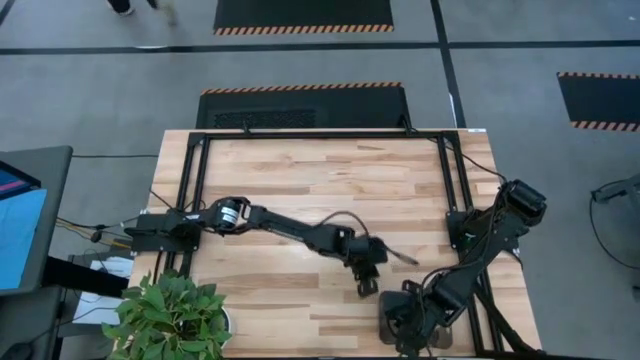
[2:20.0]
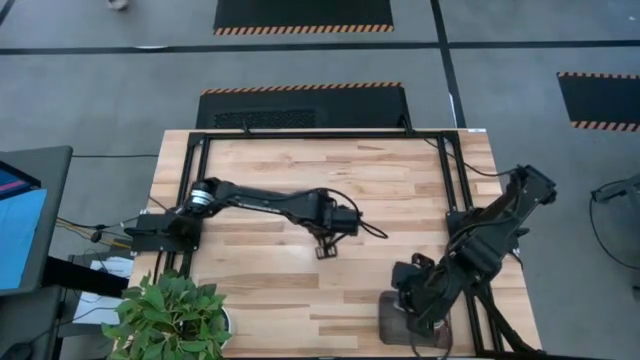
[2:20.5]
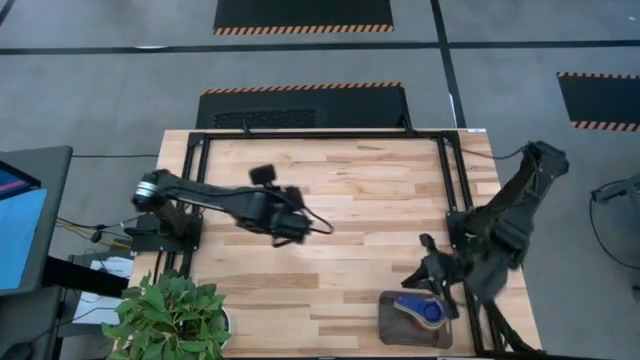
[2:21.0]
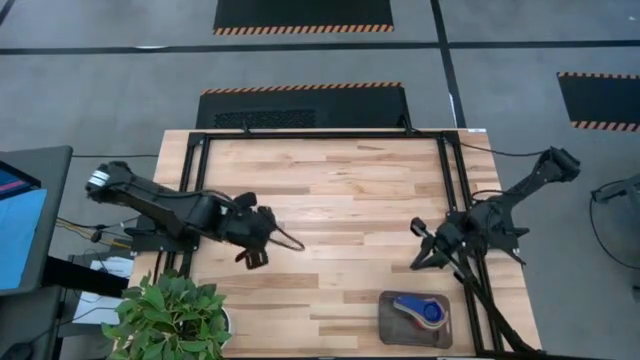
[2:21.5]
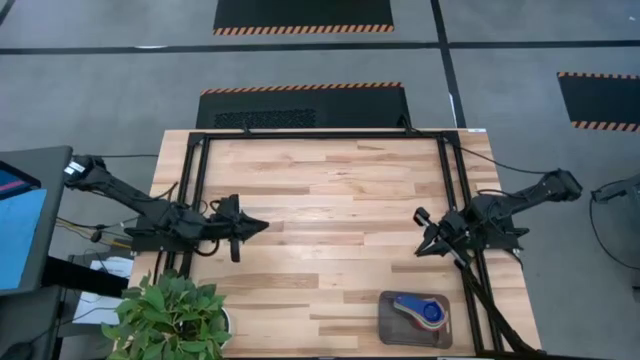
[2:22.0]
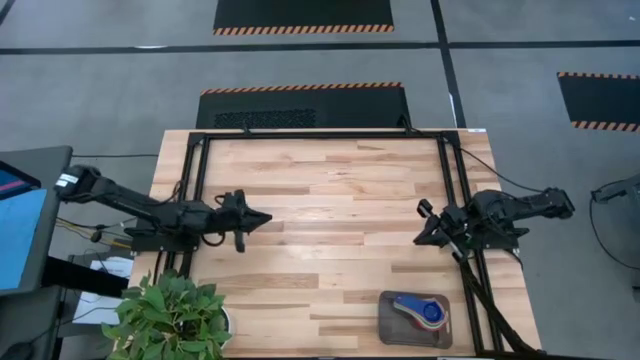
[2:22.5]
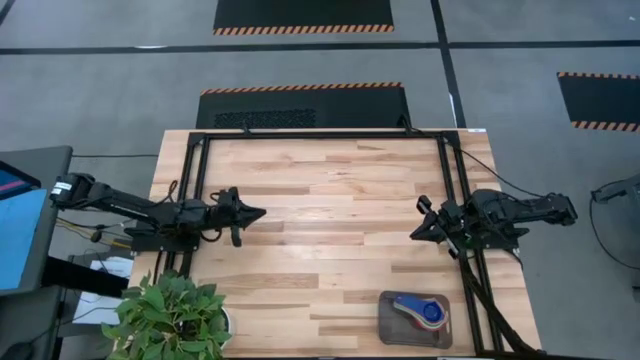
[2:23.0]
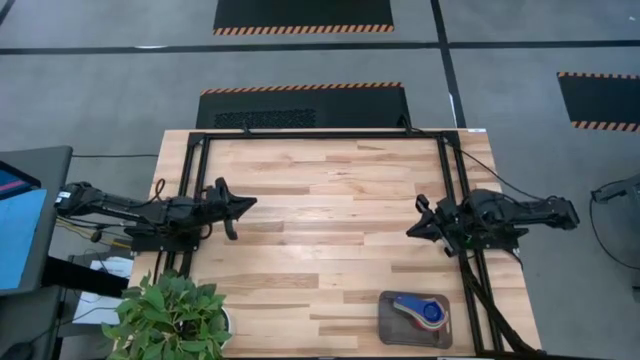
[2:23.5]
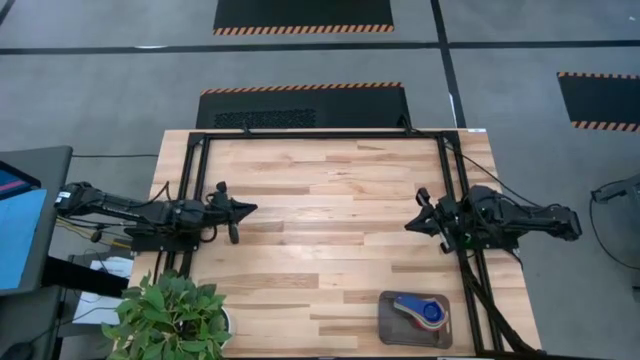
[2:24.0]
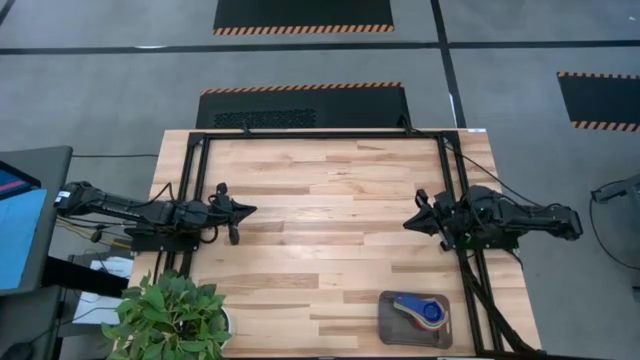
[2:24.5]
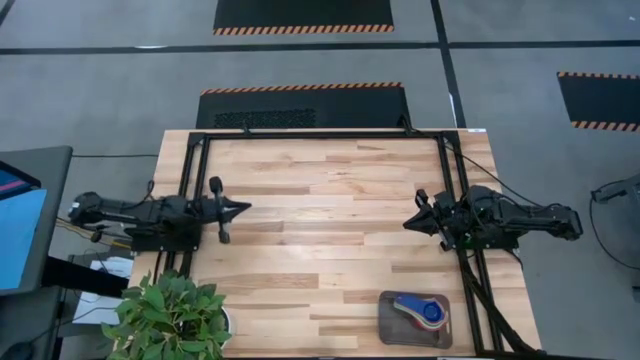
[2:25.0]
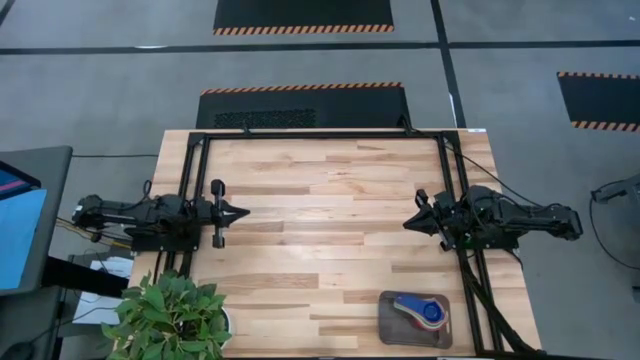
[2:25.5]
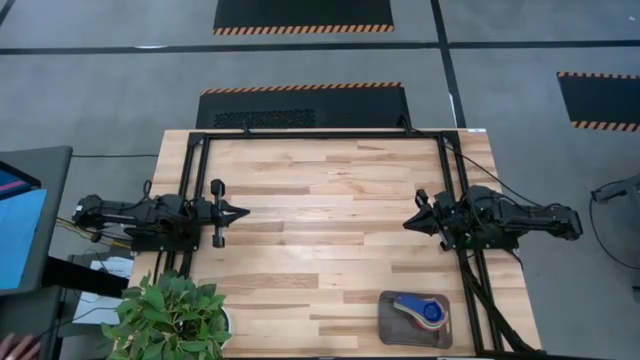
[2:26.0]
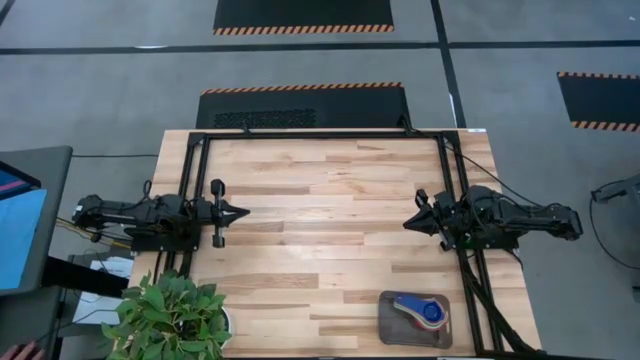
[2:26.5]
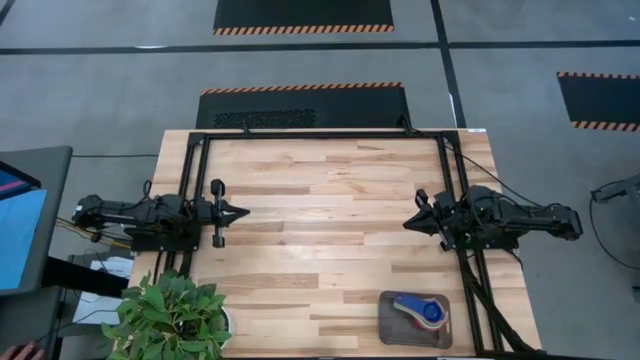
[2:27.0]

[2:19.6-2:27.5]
Task: Nest measuring cups in basket
Return to Home Position

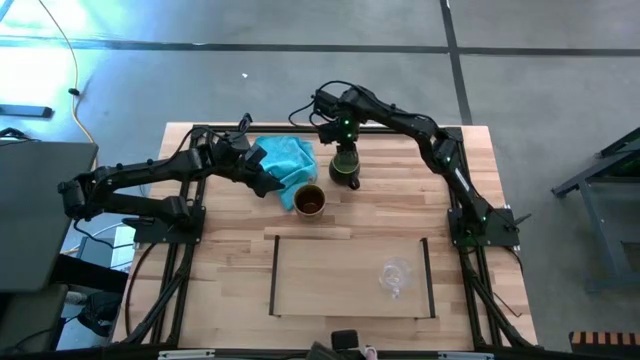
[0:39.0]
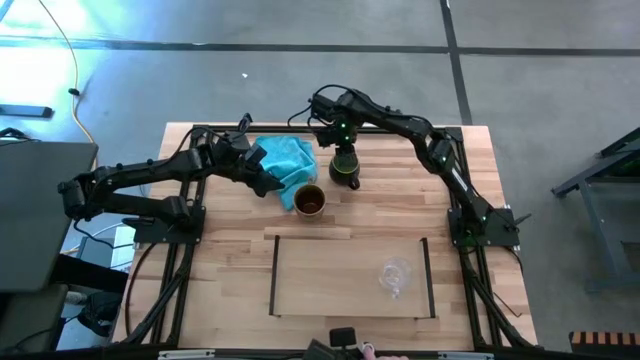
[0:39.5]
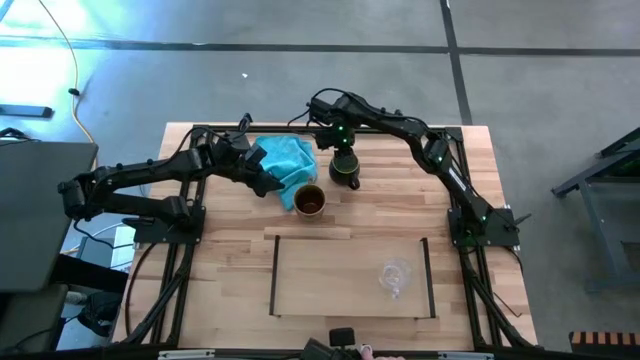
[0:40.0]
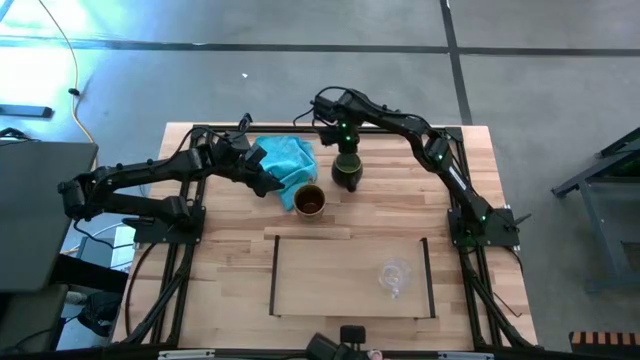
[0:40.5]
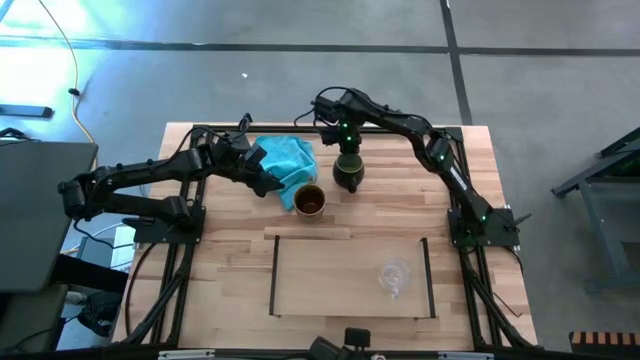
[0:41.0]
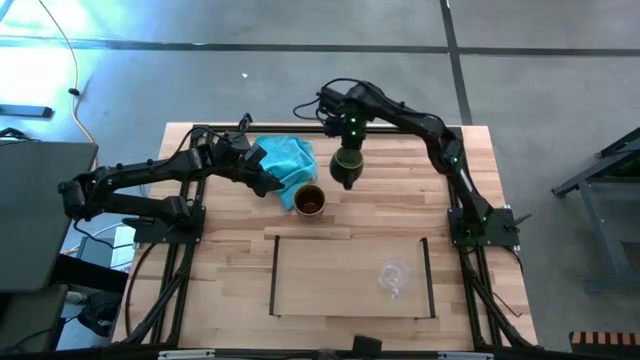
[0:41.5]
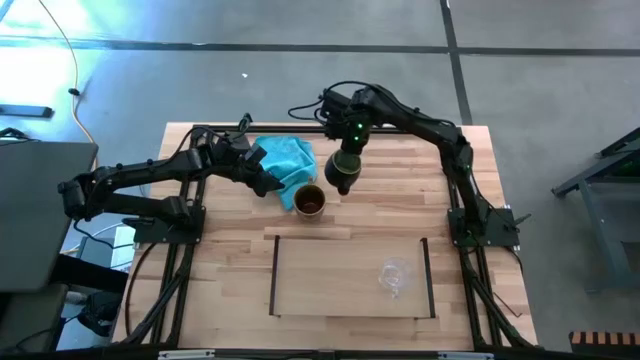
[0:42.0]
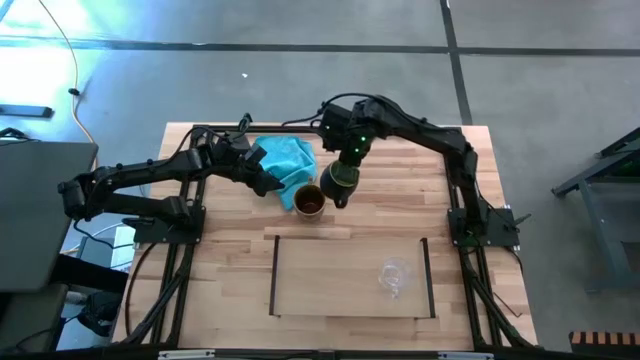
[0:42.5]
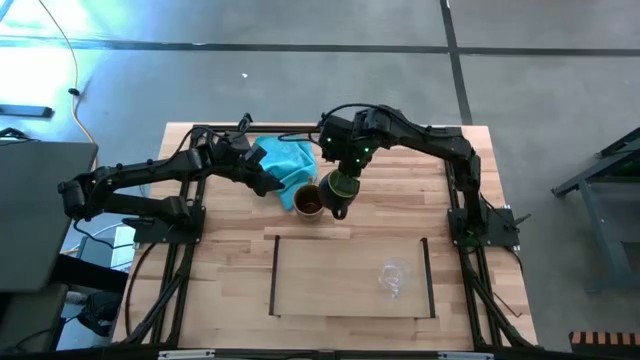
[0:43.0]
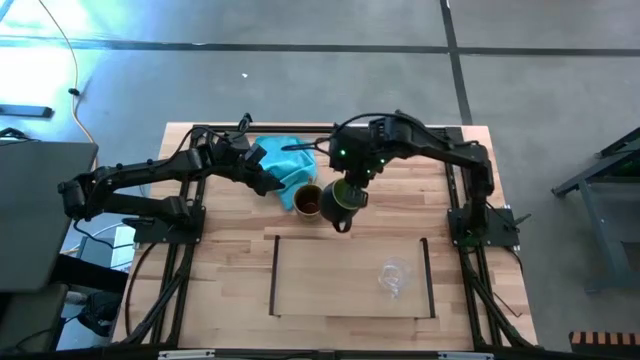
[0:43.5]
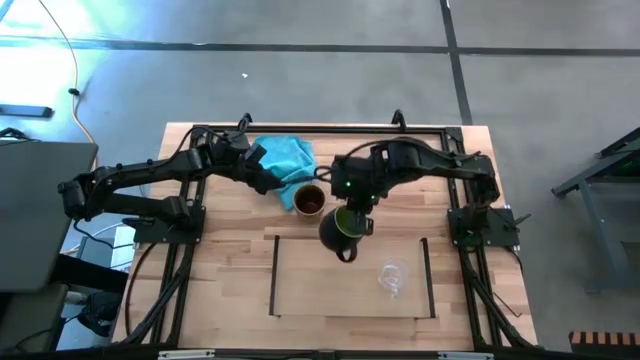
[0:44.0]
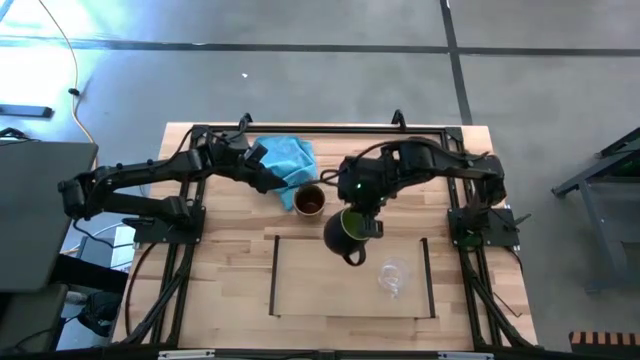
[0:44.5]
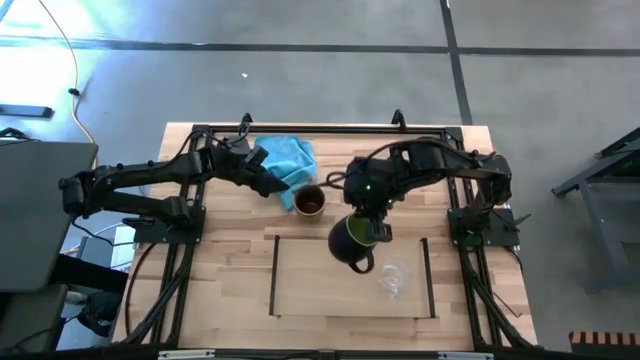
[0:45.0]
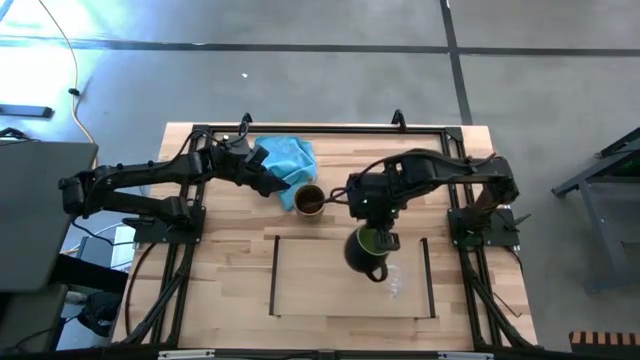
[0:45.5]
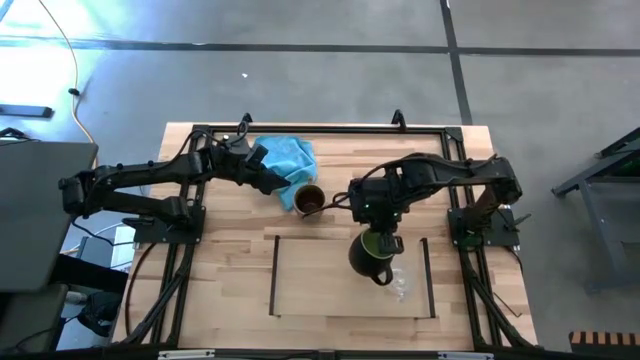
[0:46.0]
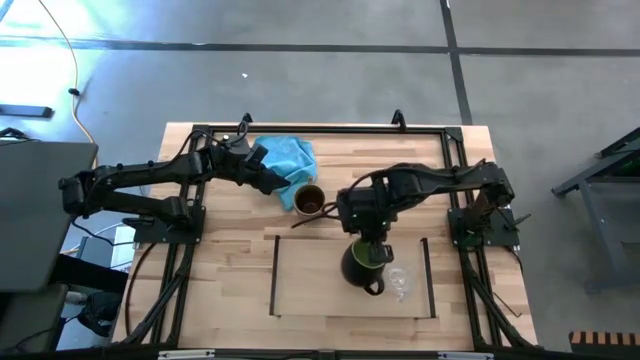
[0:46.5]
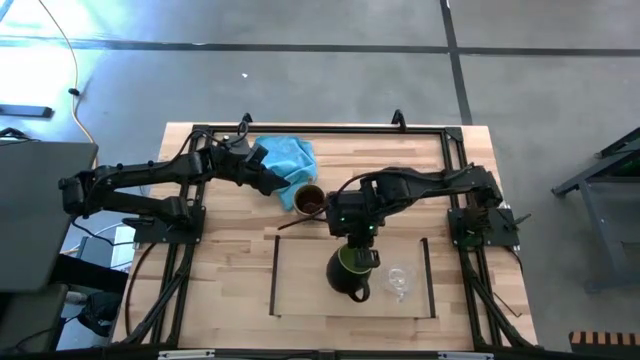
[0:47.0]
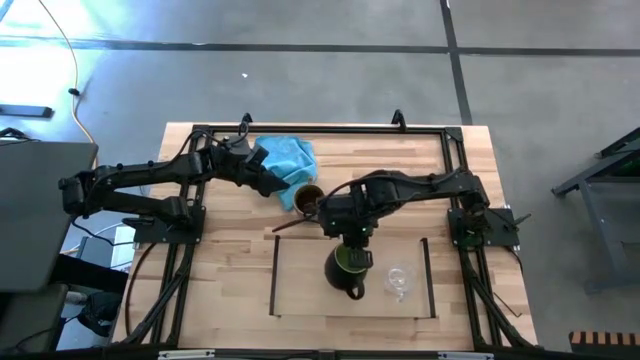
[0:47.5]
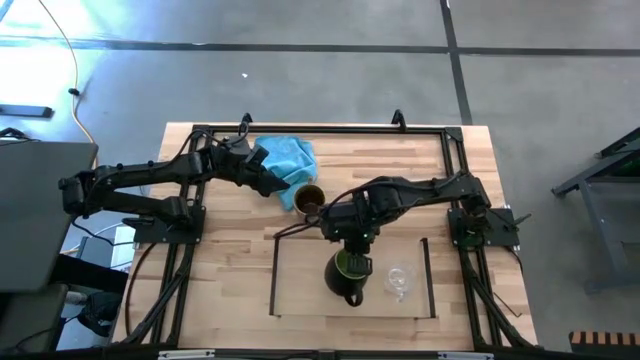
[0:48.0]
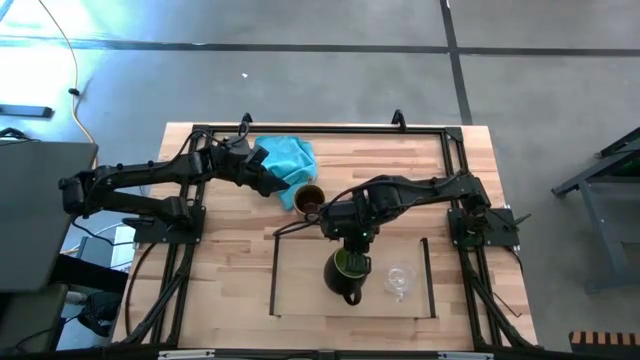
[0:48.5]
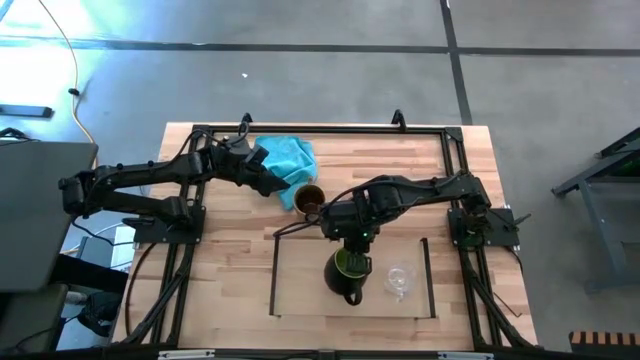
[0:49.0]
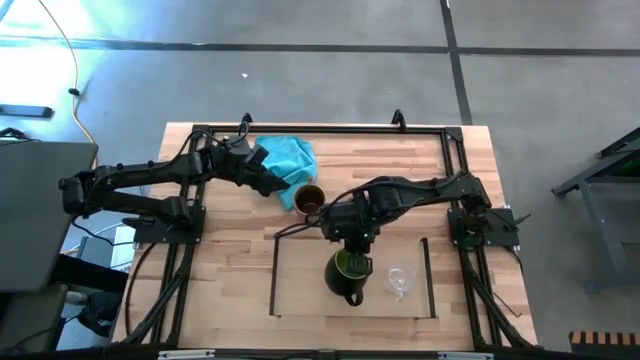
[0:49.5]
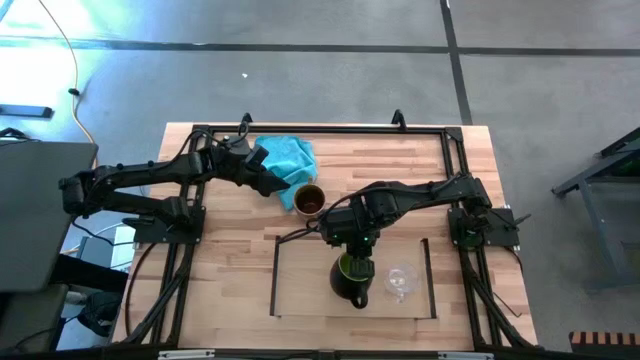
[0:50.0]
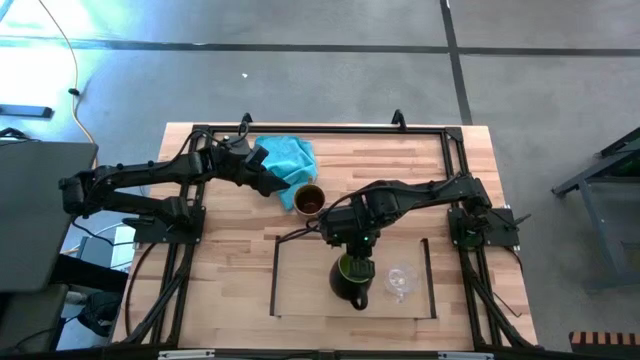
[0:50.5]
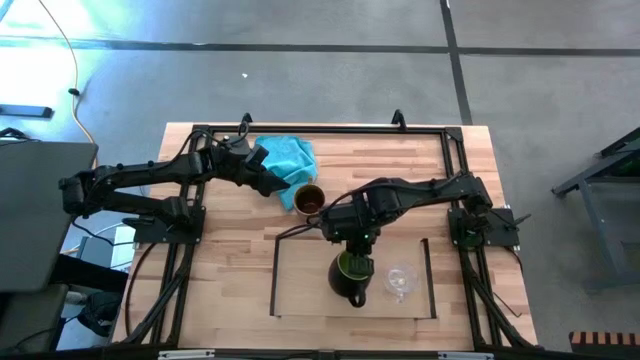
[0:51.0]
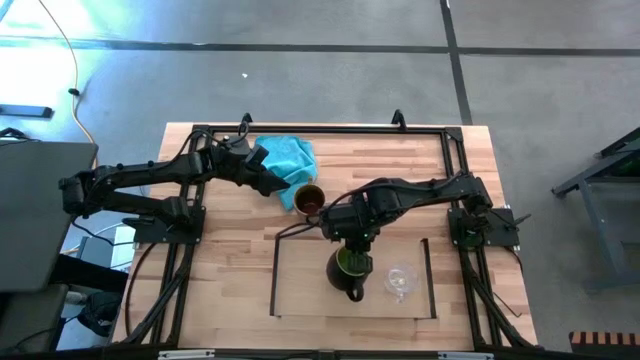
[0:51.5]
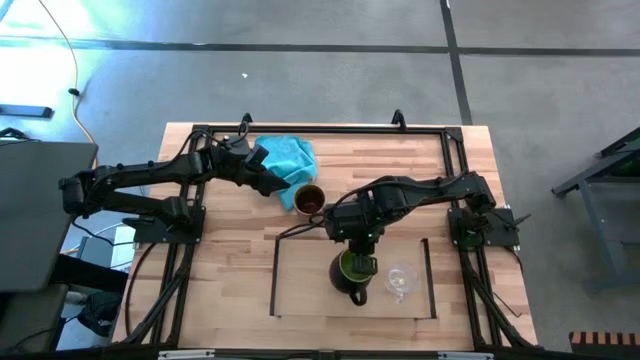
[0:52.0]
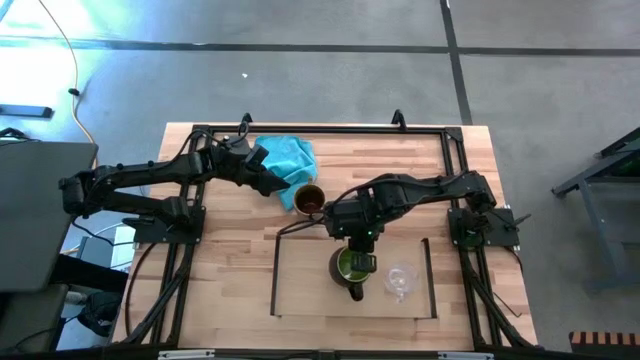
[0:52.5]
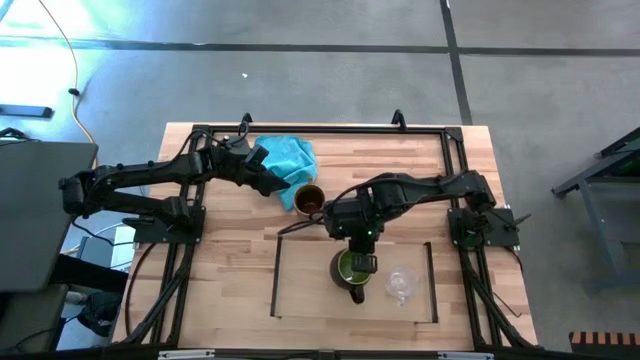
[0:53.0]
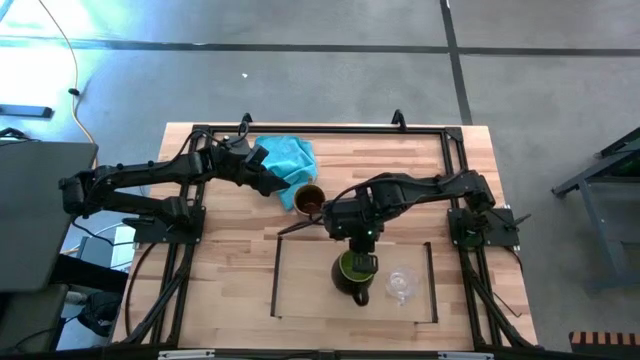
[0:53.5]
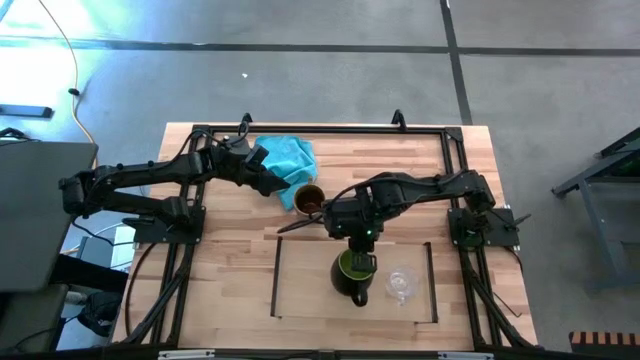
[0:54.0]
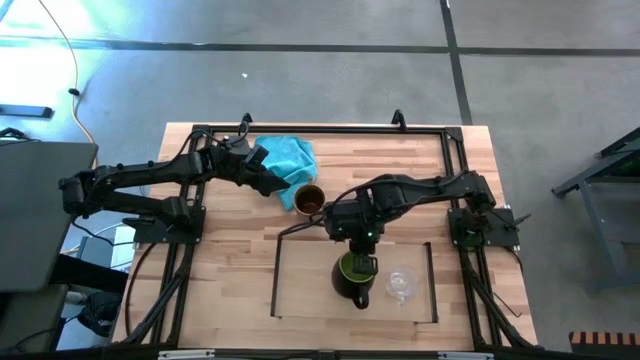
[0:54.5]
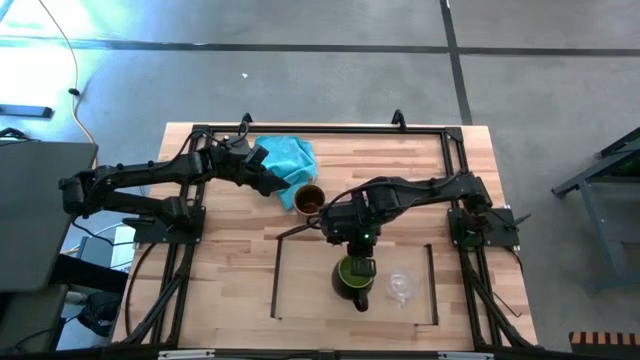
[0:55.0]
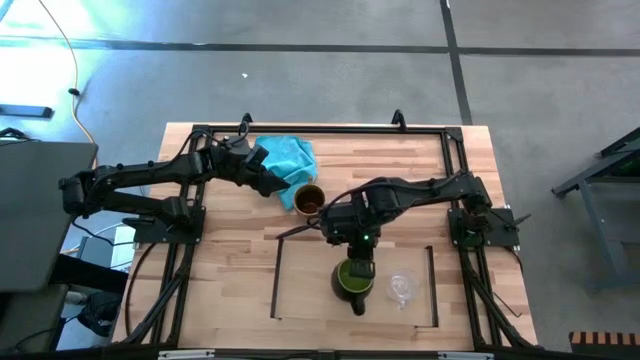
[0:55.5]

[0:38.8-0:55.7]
Task: Stack small to large cups/mugs on shelf
Put the black mug on the shelf
